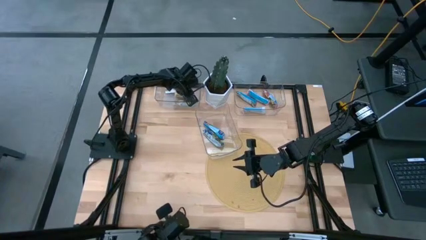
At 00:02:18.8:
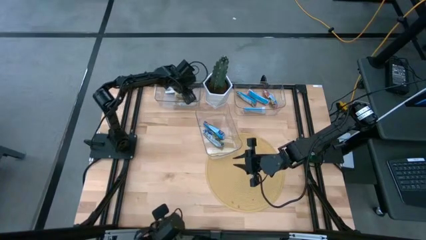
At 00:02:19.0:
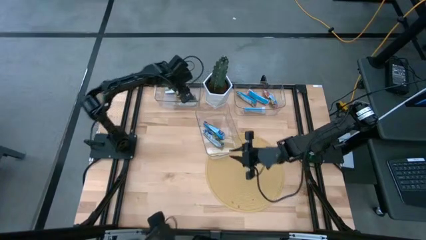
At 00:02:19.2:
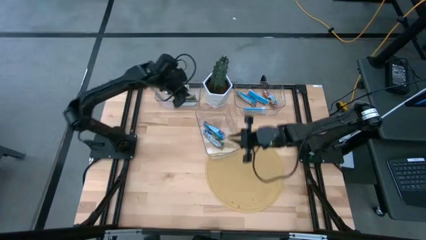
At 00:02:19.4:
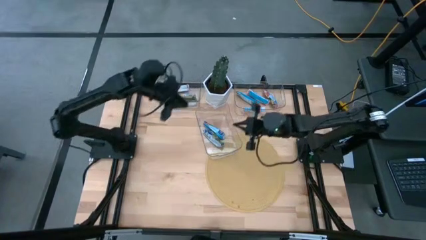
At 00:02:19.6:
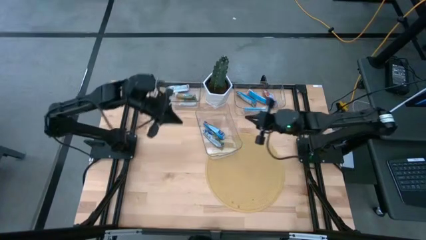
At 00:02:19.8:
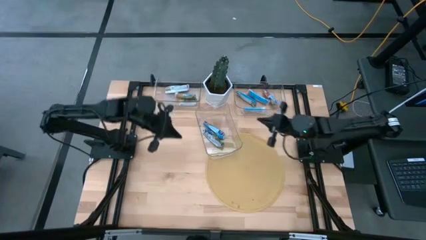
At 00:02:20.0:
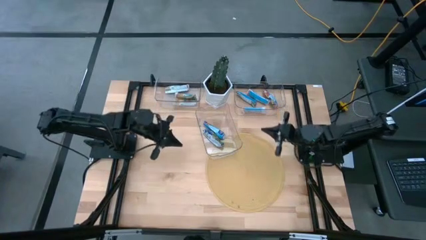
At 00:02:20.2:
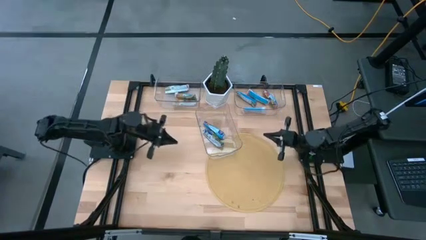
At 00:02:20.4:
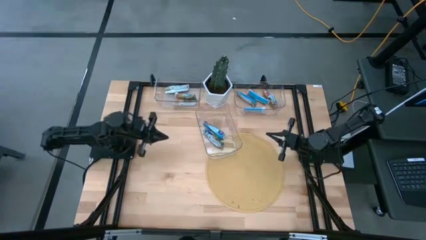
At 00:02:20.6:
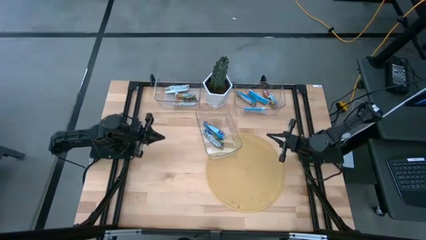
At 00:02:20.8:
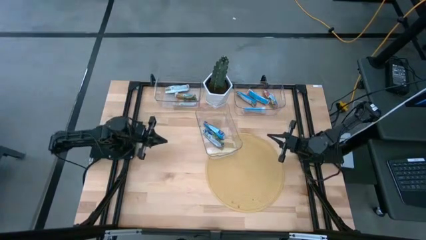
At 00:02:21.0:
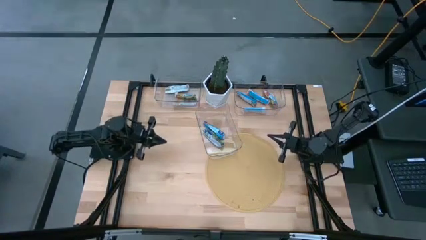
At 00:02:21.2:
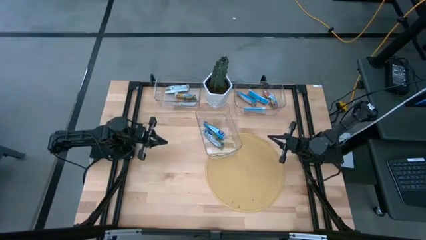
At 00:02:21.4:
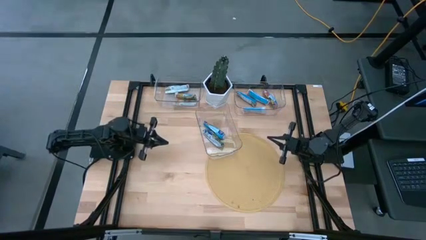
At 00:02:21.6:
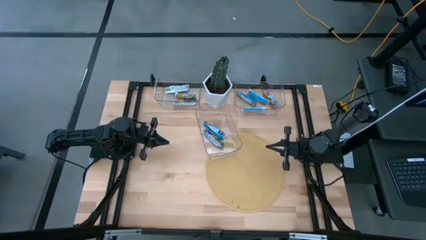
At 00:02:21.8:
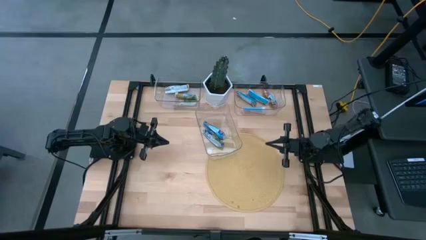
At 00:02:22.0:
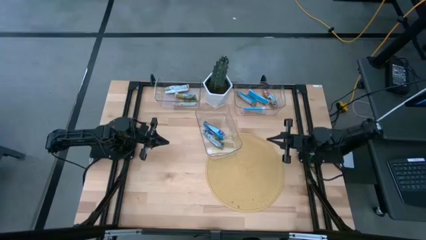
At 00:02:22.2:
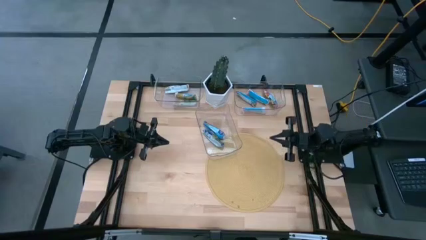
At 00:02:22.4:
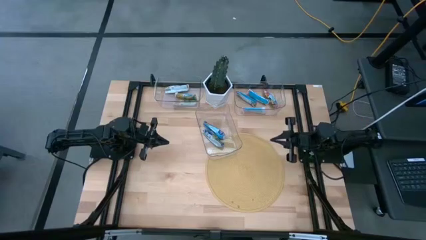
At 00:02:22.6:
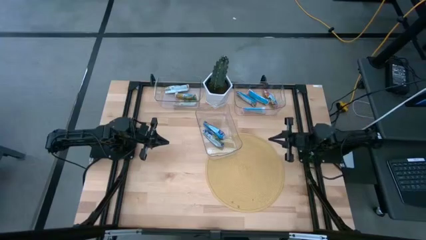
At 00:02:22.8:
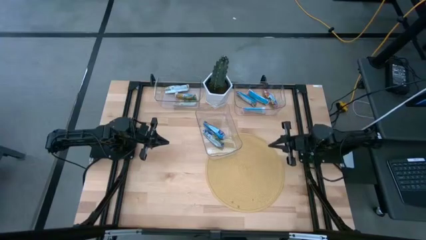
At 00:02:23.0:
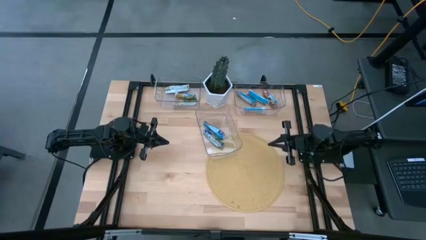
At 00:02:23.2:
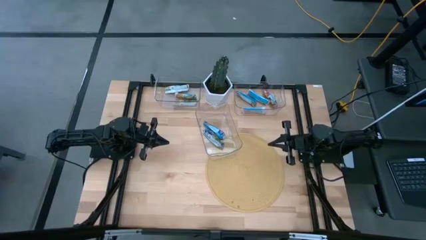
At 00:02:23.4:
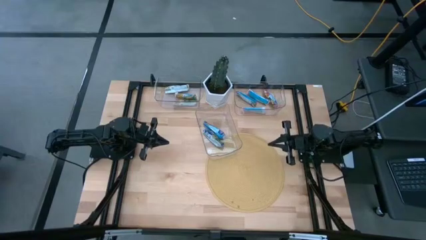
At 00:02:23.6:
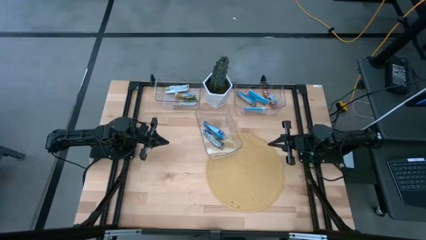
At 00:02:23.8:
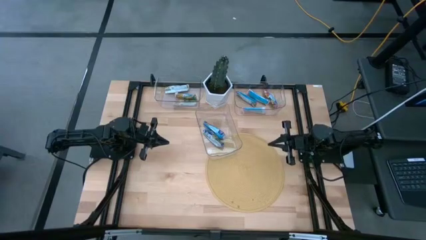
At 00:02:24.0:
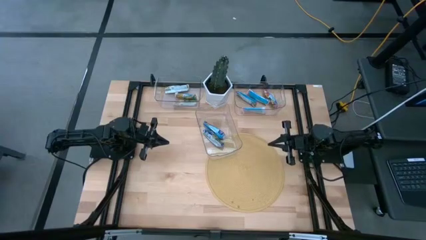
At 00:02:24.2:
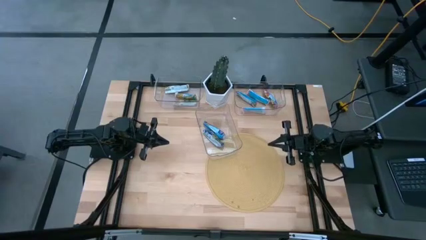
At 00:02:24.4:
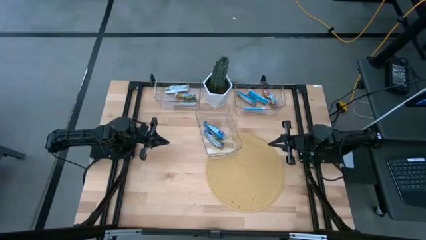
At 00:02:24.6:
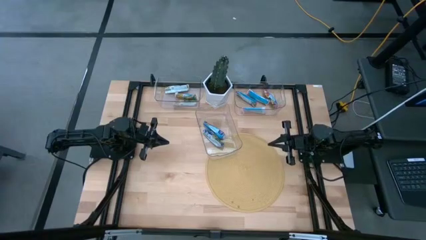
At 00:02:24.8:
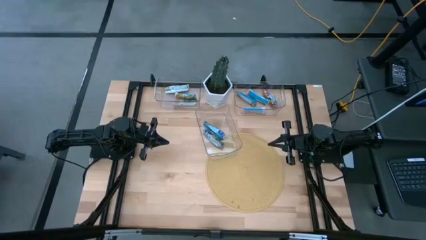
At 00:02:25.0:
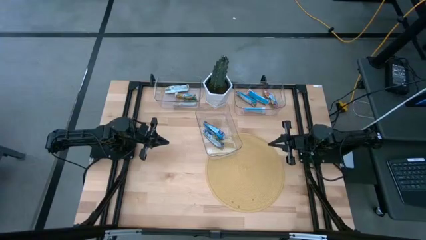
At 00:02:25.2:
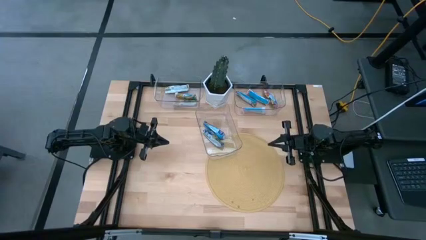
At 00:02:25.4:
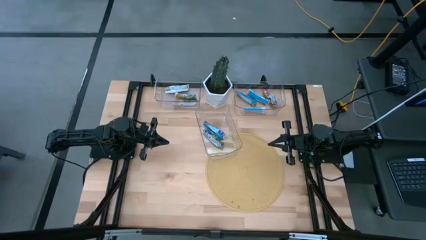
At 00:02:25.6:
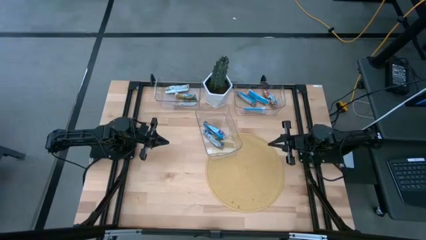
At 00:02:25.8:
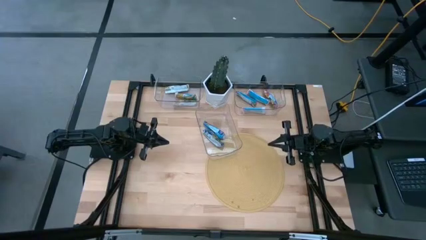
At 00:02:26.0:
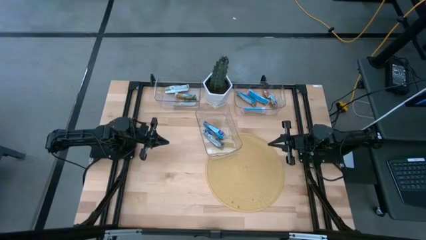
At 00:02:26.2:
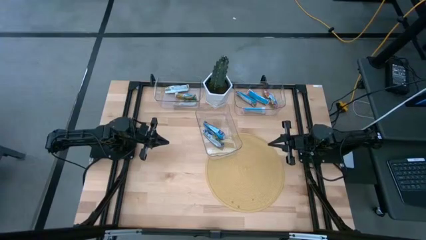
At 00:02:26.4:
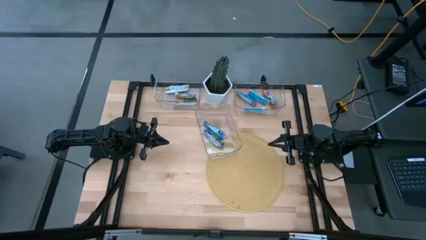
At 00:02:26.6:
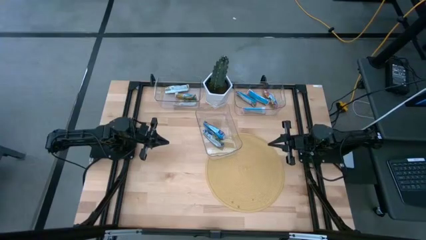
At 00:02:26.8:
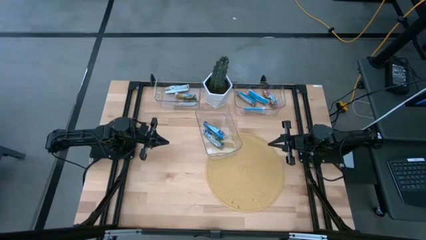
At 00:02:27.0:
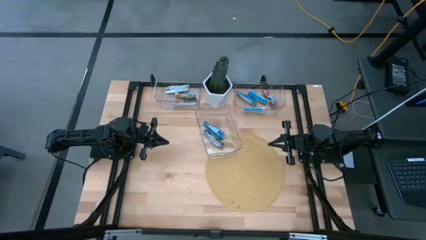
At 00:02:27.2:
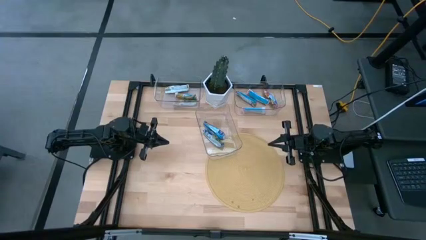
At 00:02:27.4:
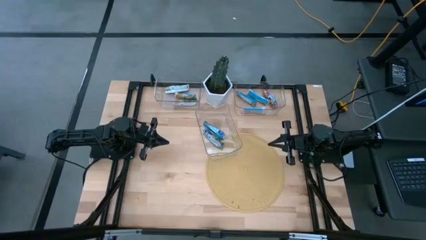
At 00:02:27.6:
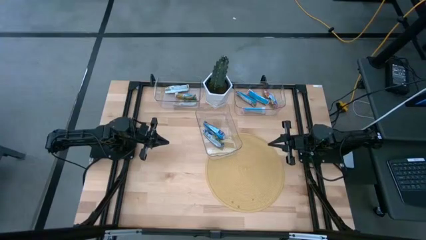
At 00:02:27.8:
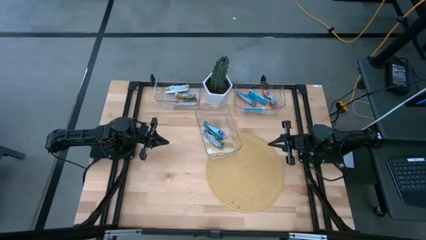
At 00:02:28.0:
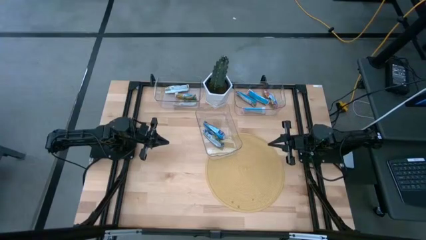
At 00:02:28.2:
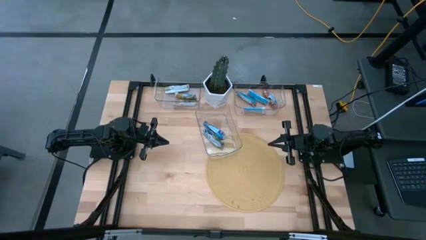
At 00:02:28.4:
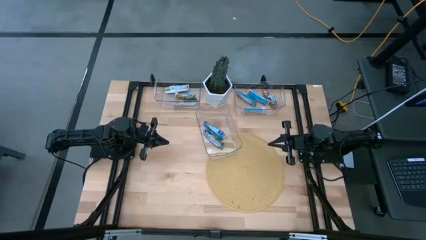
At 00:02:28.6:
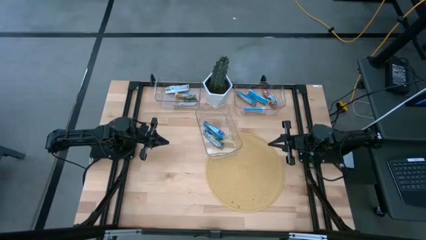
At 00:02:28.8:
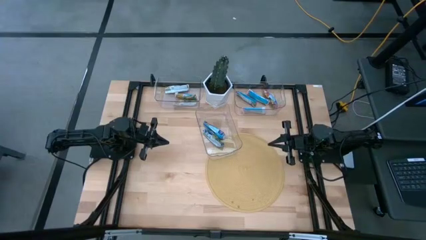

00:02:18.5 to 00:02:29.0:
Task: Pick and place Granola Bars by type
Return to Home Position

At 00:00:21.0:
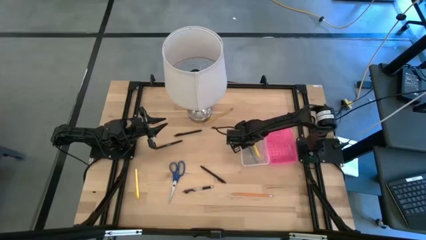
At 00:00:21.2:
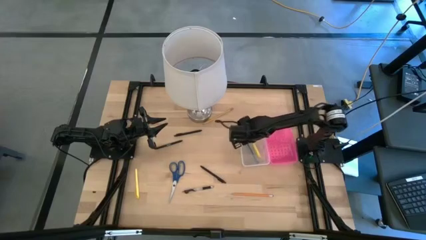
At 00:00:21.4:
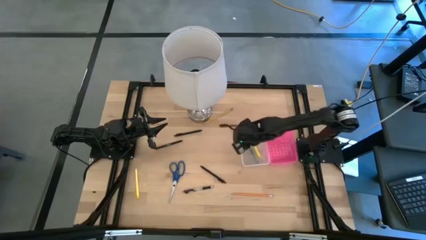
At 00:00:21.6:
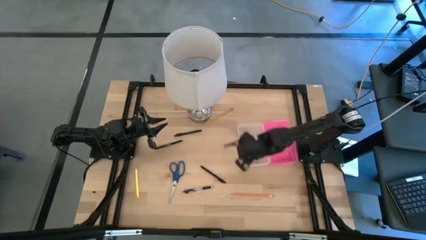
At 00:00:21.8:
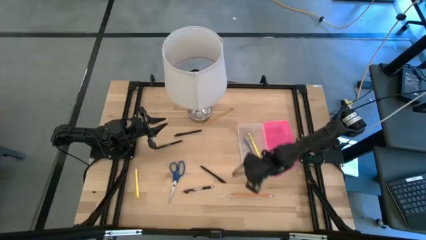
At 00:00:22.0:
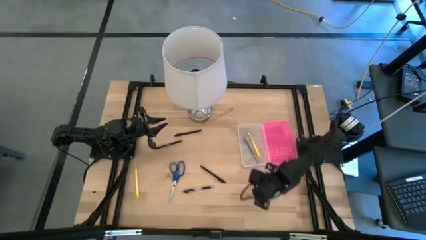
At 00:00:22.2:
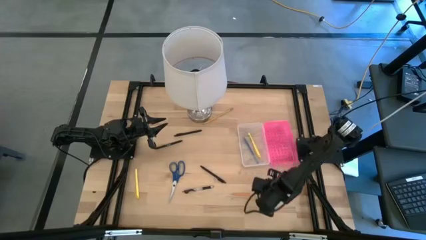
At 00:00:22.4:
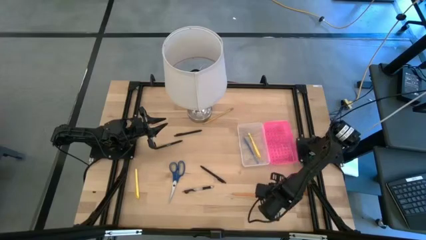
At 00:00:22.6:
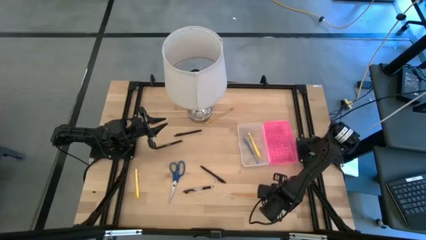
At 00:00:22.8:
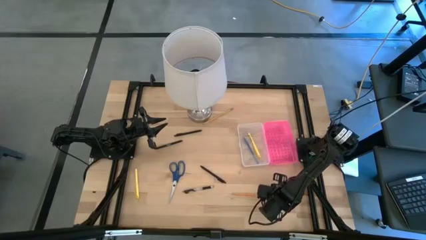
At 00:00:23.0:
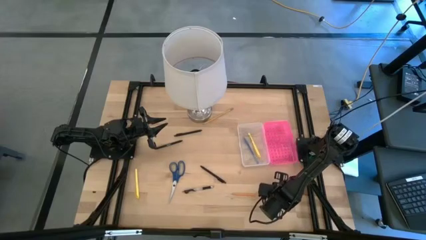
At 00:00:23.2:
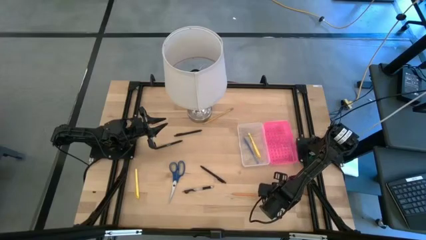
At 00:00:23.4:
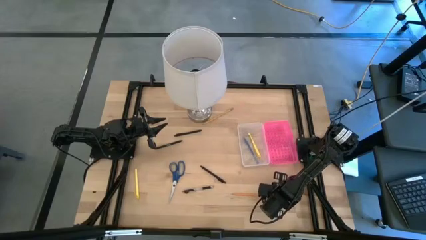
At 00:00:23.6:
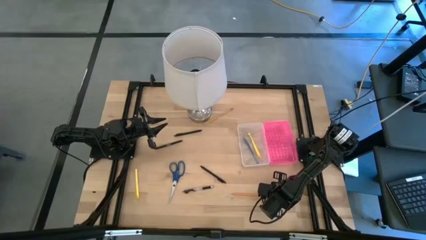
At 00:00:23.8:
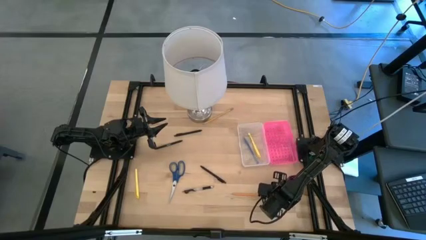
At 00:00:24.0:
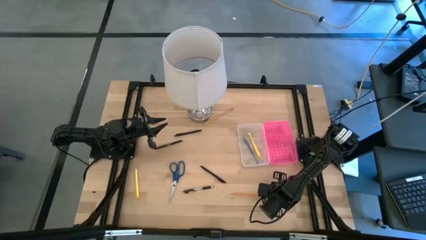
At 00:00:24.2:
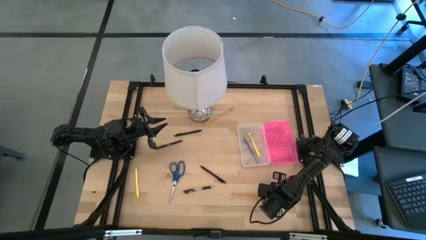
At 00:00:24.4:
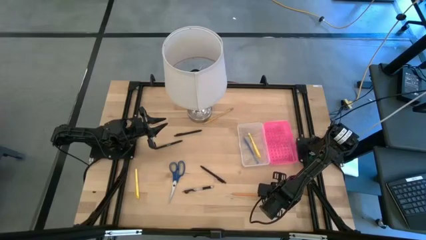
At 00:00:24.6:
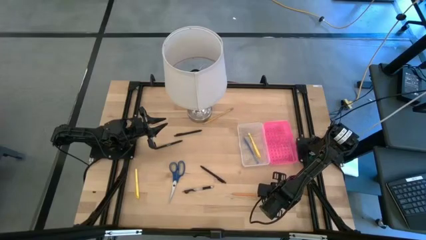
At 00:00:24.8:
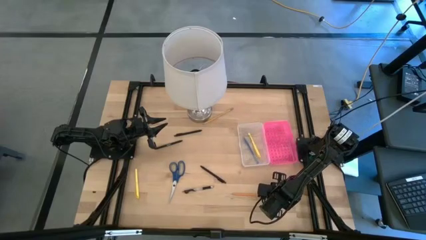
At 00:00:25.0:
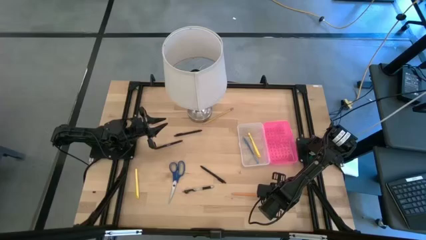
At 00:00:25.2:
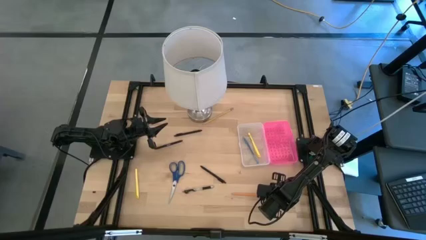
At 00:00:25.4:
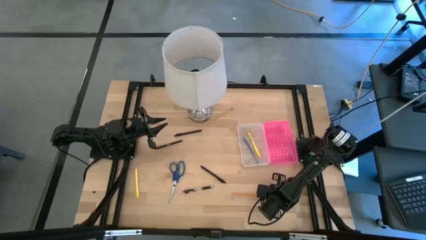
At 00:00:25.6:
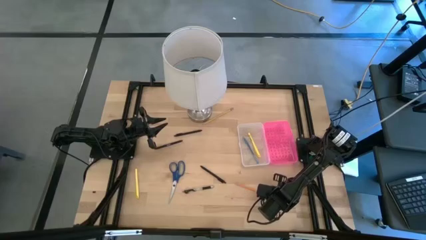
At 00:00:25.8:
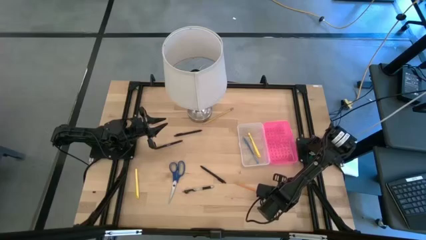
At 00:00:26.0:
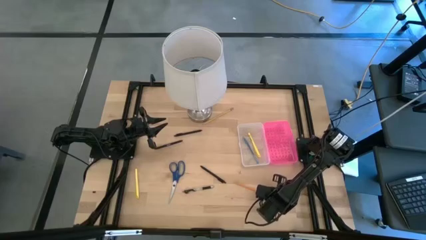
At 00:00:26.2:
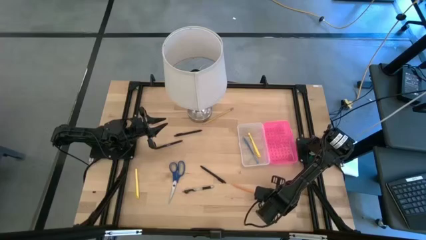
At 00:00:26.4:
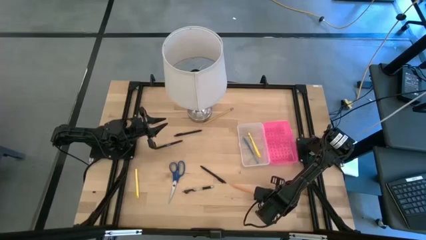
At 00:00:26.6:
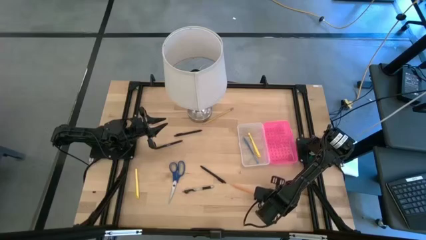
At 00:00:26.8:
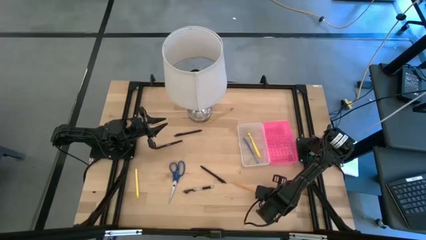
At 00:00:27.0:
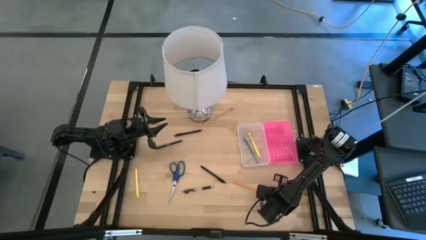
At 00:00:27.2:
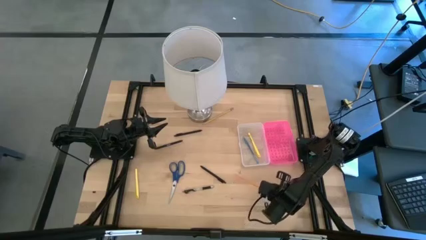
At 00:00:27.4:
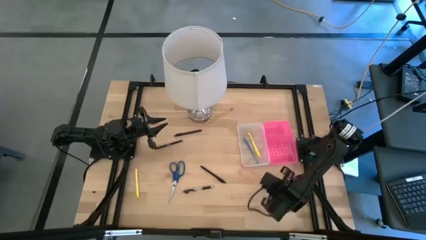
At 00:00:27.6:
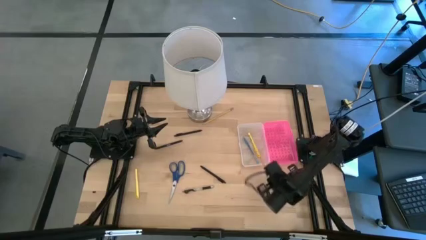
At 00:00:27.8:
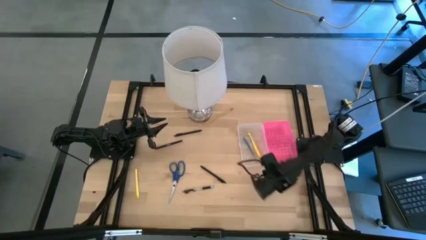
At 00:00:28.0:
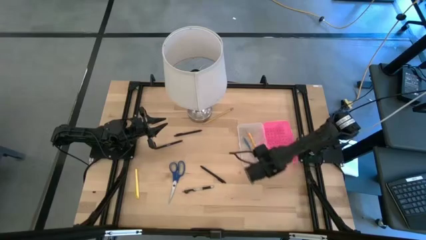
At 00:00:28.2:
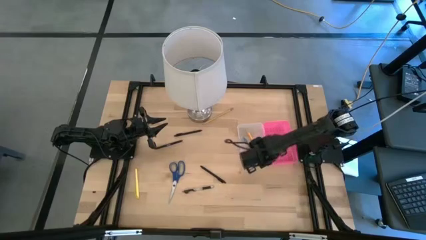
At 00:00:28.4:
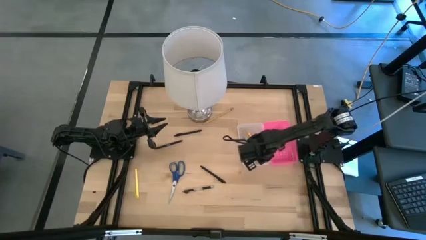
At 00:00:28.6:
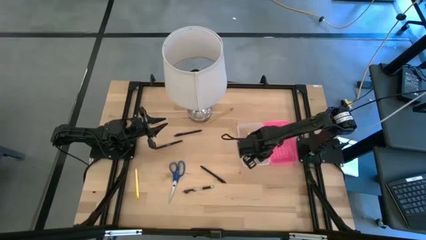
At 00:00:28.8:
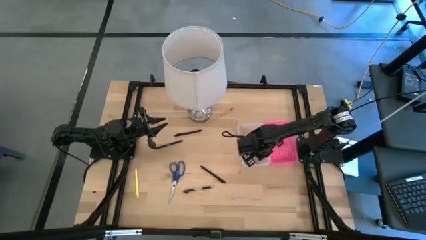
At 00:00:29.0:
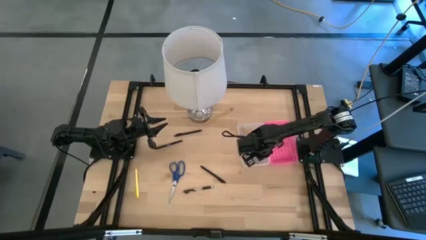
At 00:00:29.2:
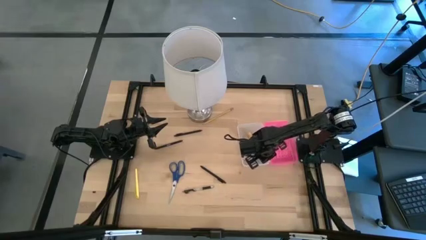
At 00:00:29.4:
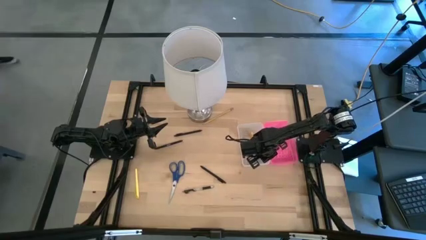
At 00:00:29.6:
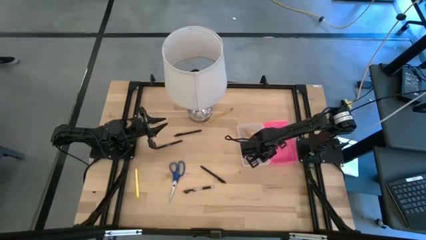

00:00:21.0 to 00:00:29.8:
Task: Pick & place school supplies into a supply box
Put the orange pencil into the supply box
